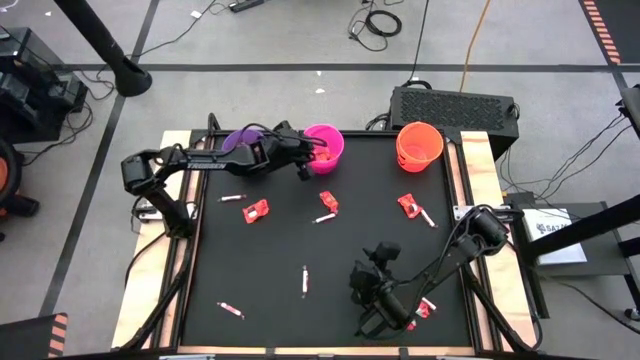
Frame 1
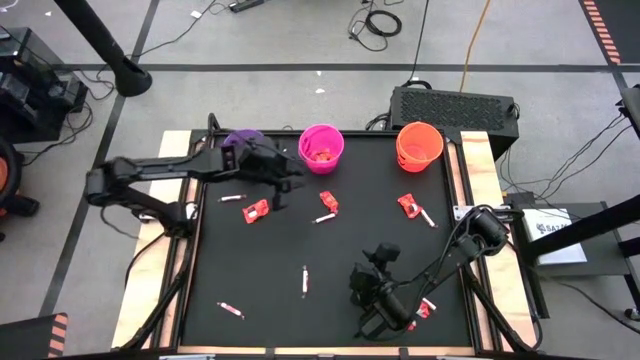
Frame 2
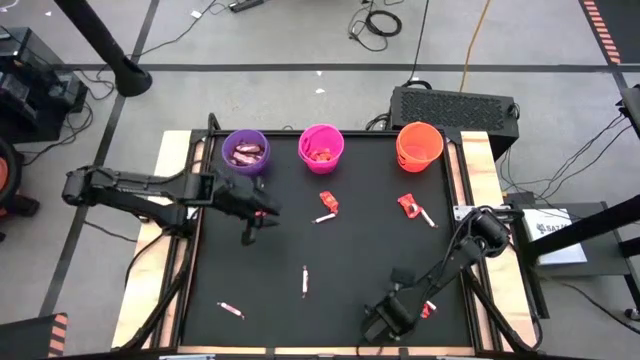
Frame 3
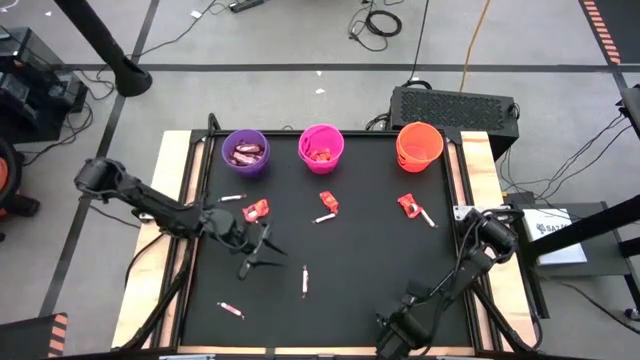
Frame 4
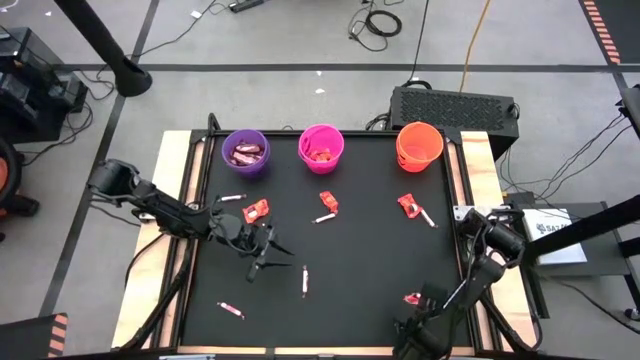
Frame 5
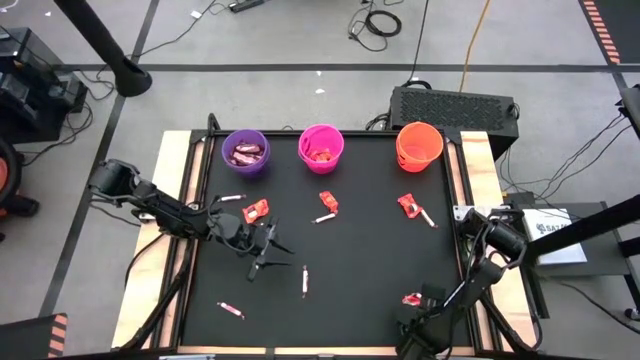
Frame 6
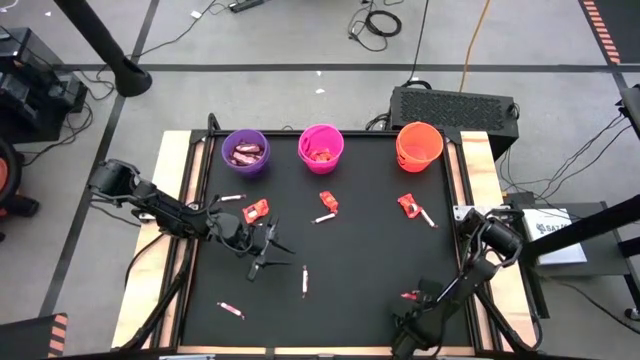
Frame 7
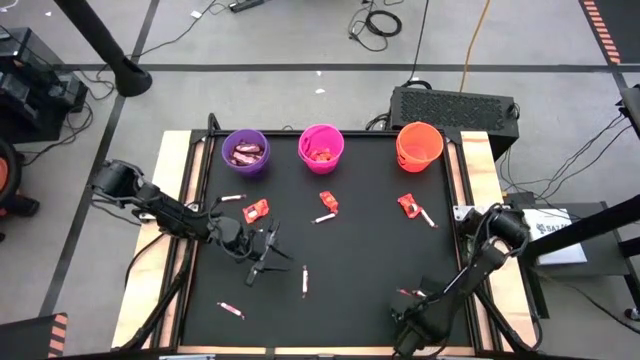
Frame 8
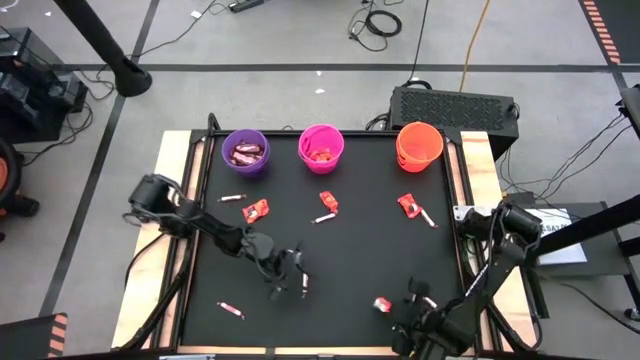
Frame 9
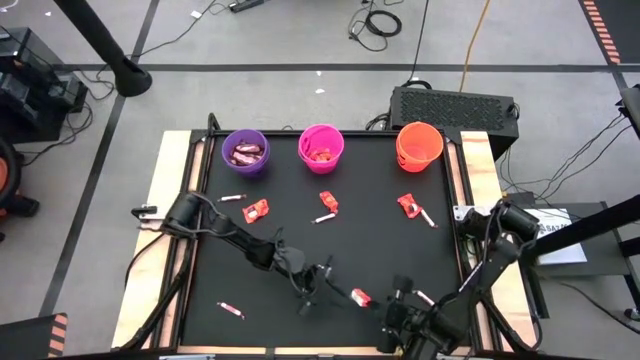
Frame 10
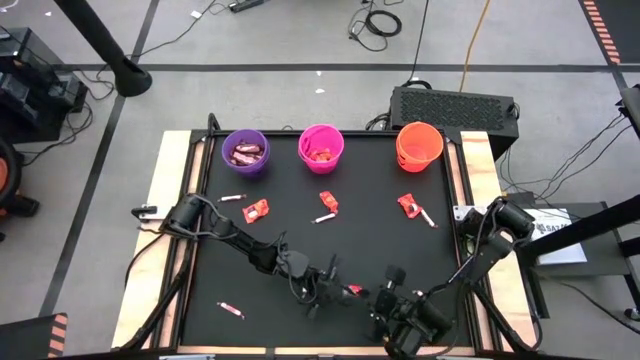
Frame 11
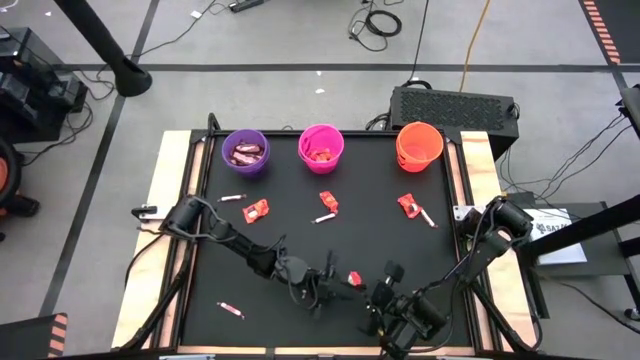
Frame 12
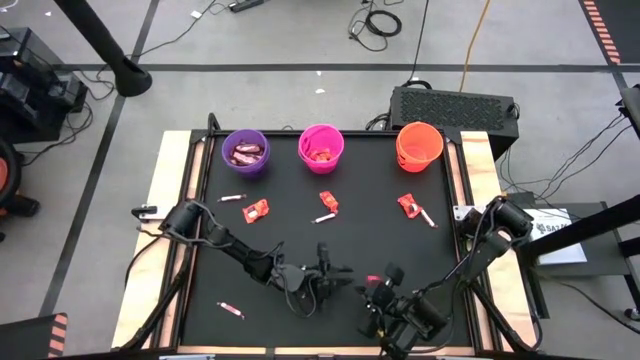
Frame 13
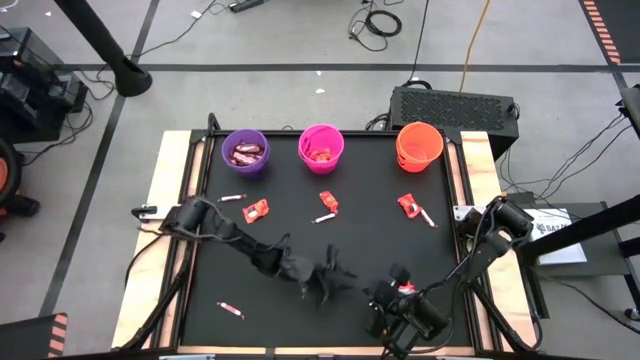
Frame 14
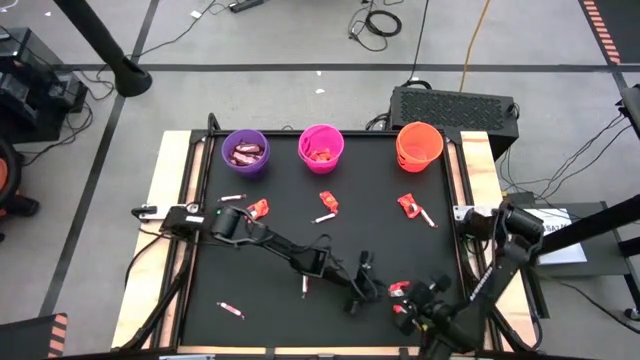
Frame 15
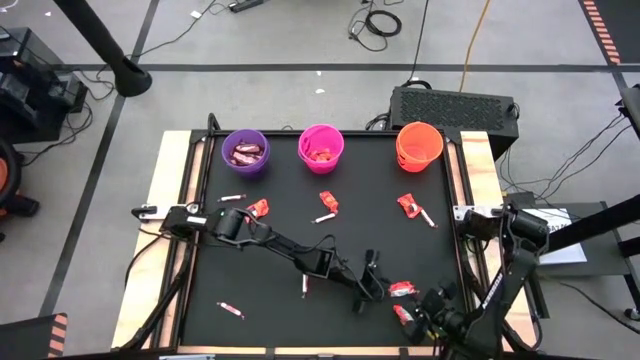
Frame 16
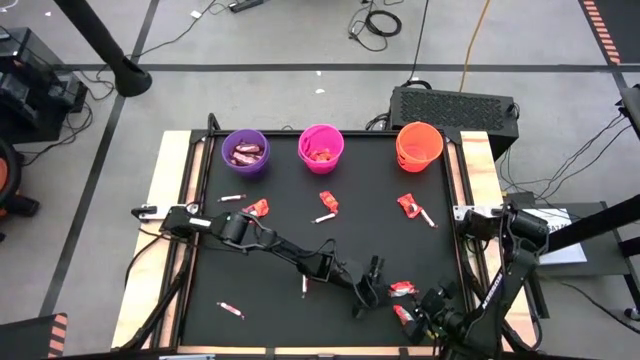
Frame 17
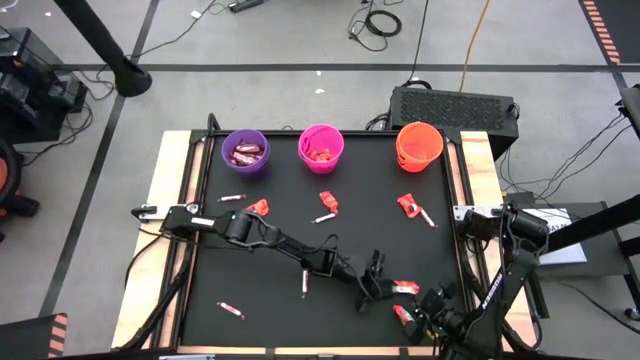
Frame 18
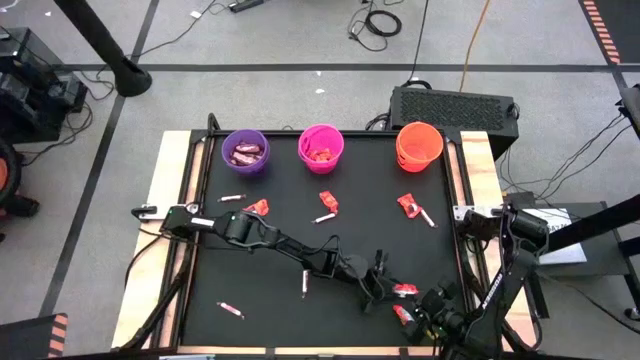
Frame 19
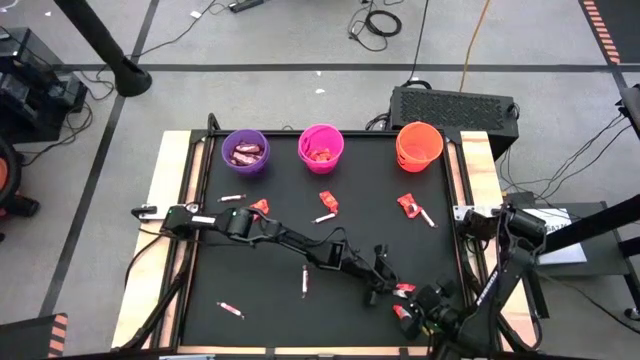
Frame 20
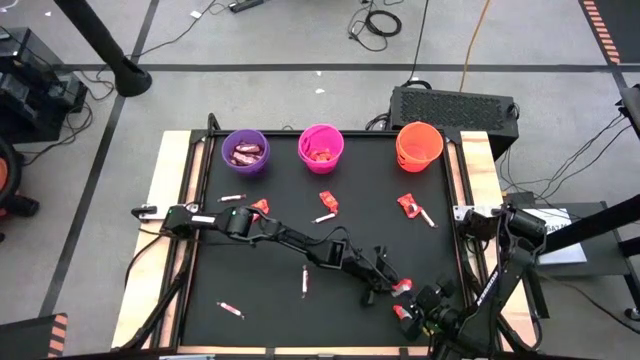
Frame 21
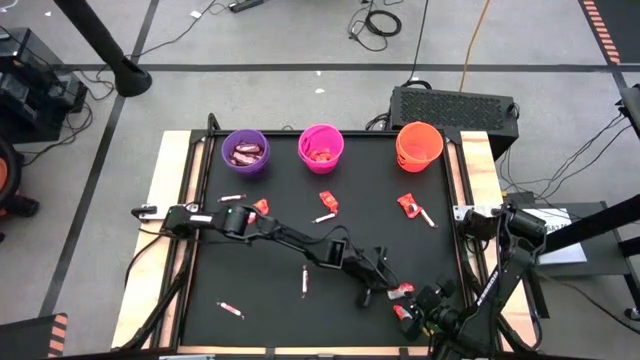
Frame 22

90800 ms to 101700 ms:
Task: Sort candy by brand, put in halloween buckets
Put the red chocolate bar into the pink bucket

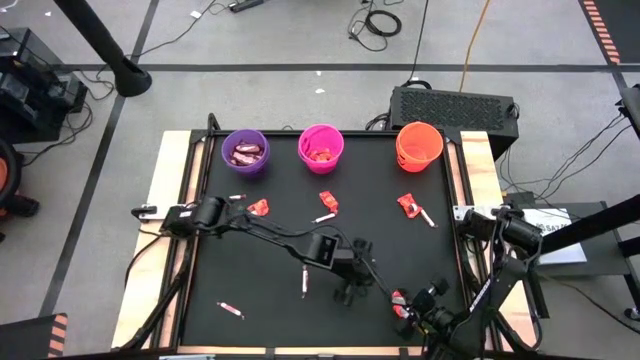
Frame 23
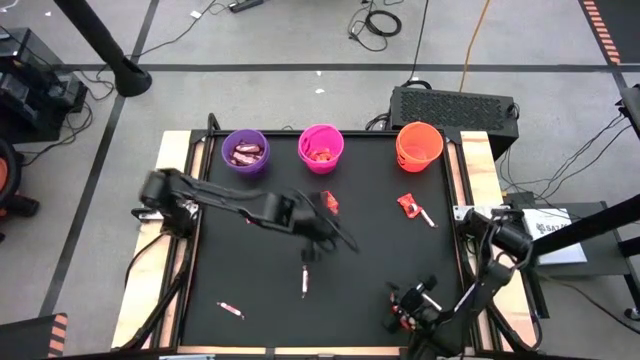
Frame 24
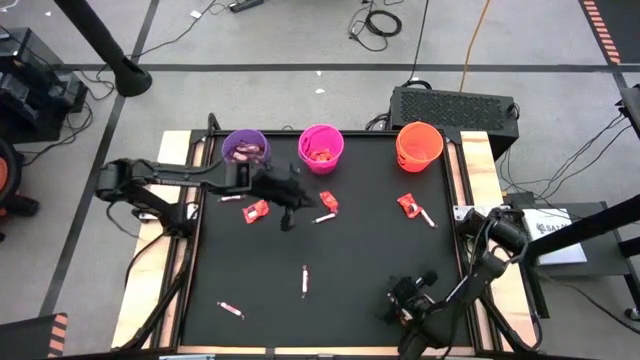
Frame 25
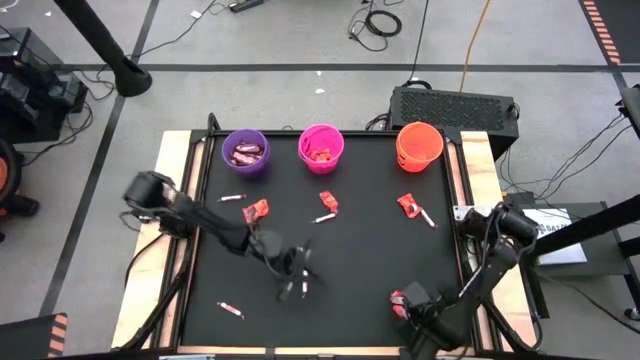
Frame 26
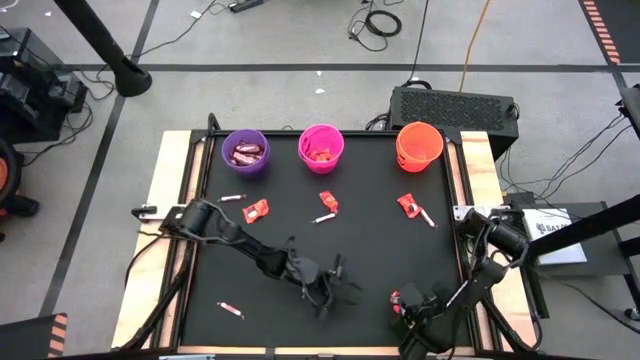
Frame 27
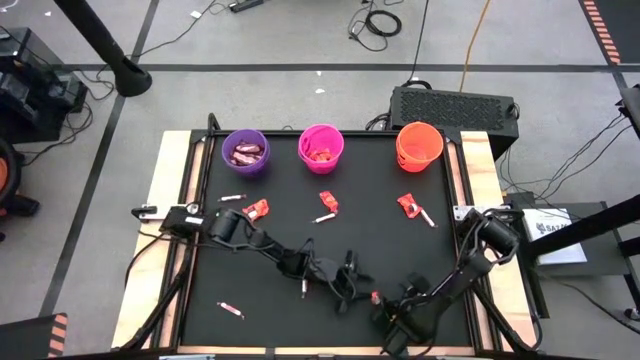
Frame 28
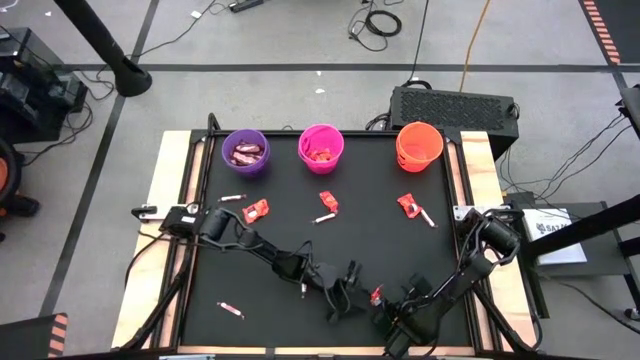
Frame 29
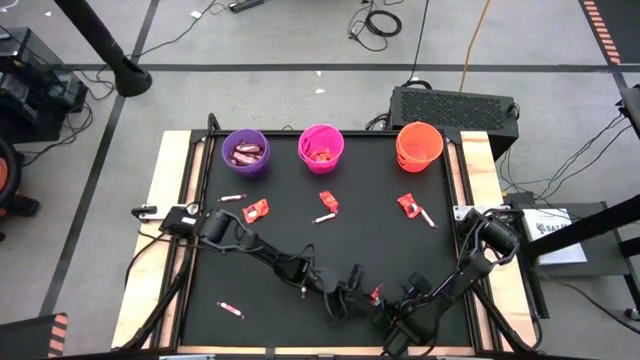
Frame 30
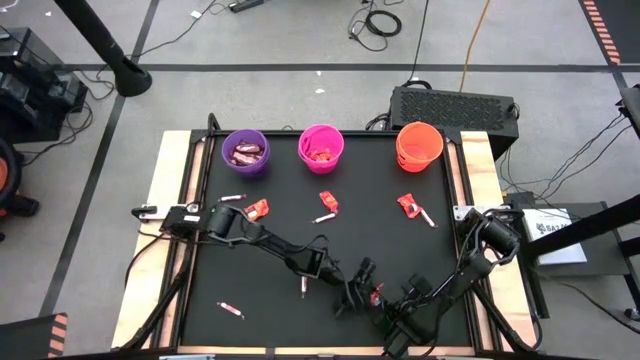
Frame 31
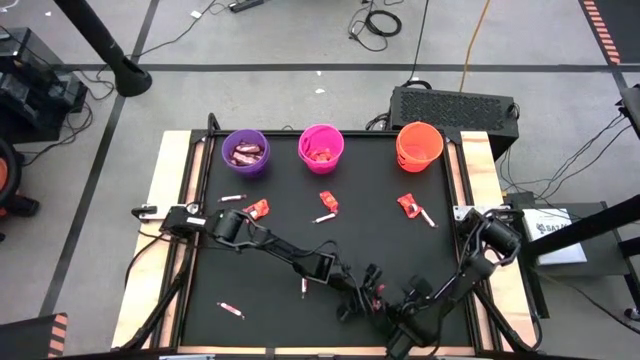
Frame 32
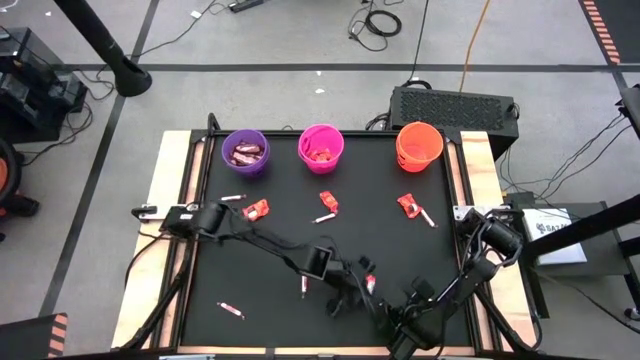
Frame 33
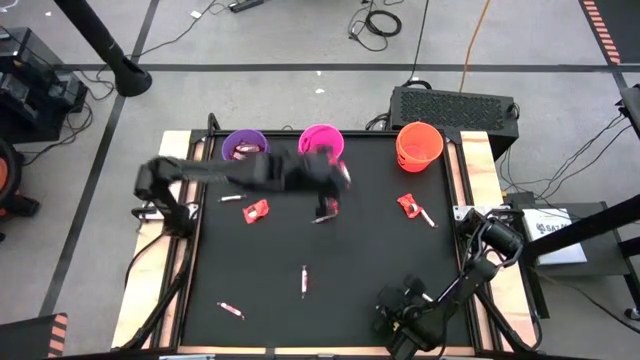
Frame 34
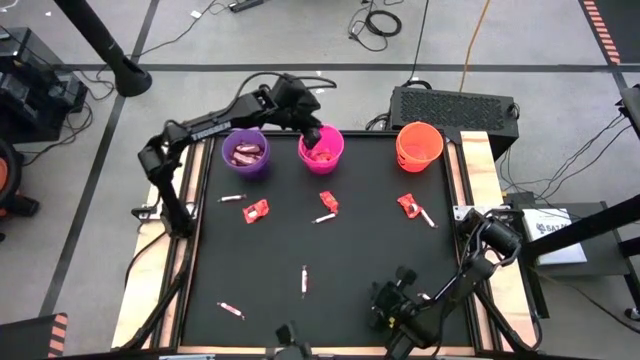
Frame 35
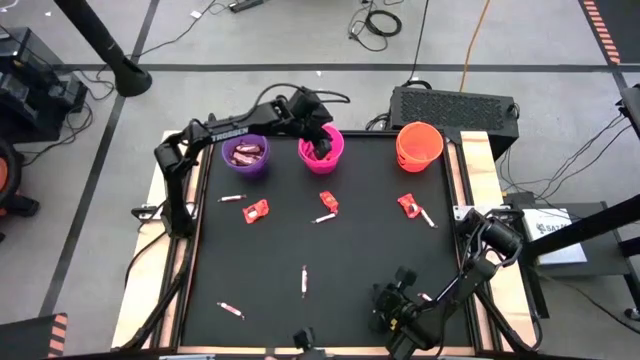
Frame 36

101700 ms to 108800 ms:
Put the red chocolate bar into the pink bucket

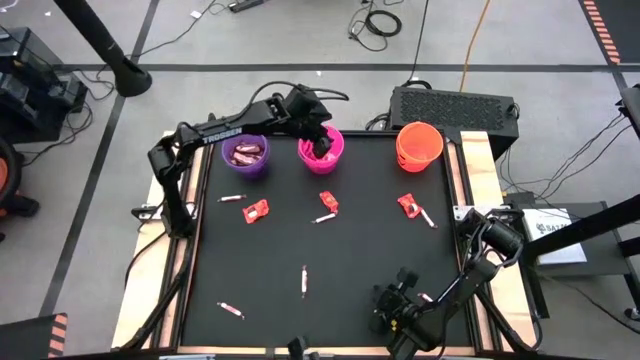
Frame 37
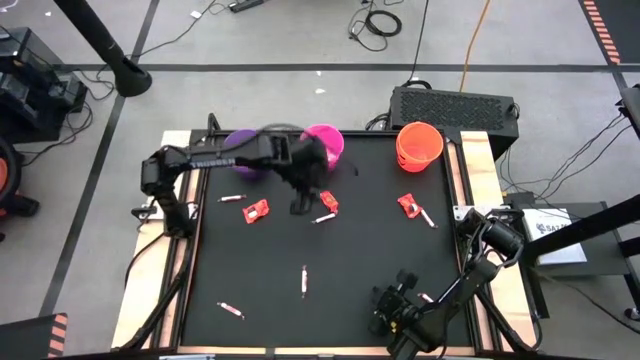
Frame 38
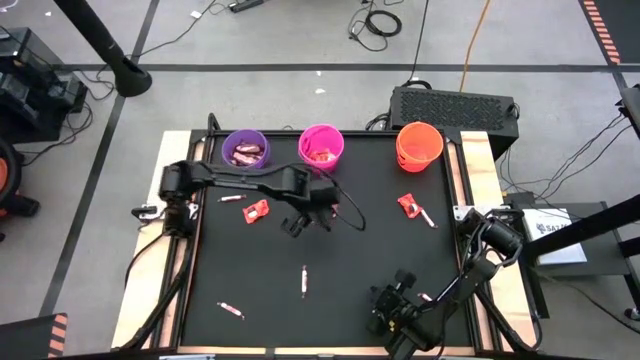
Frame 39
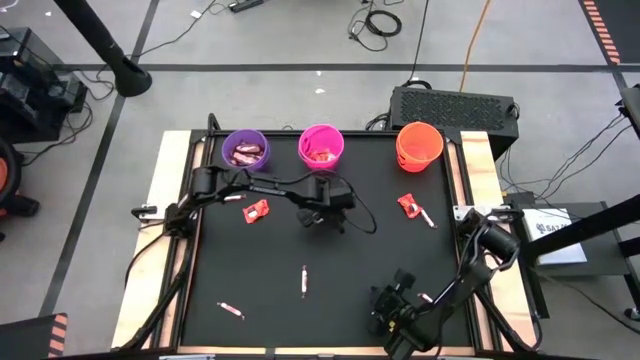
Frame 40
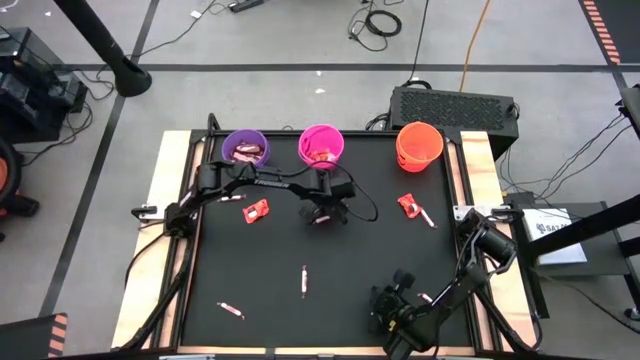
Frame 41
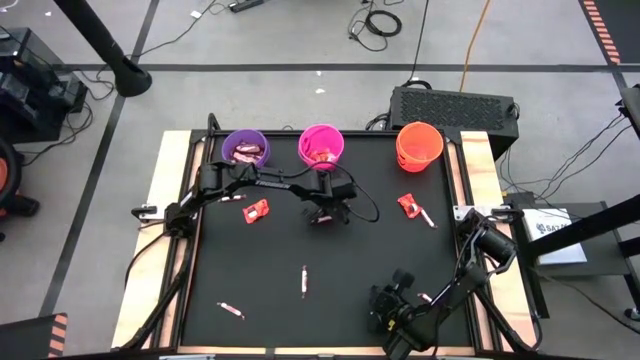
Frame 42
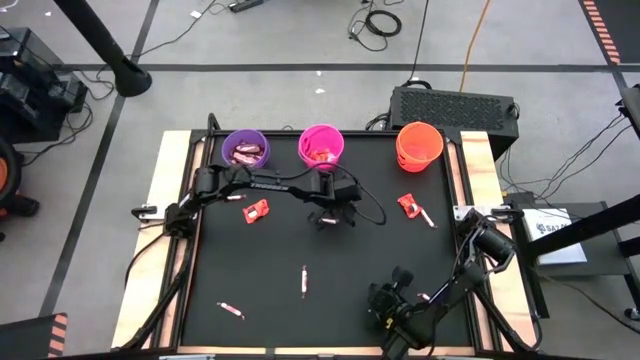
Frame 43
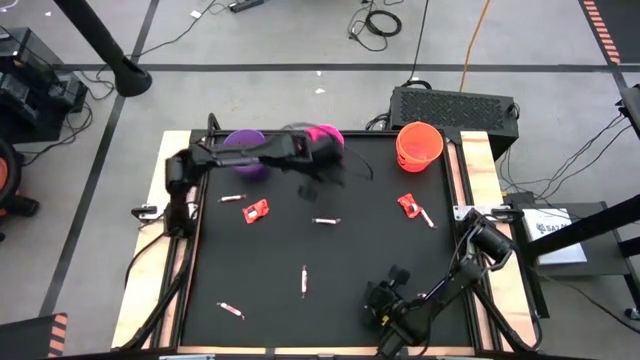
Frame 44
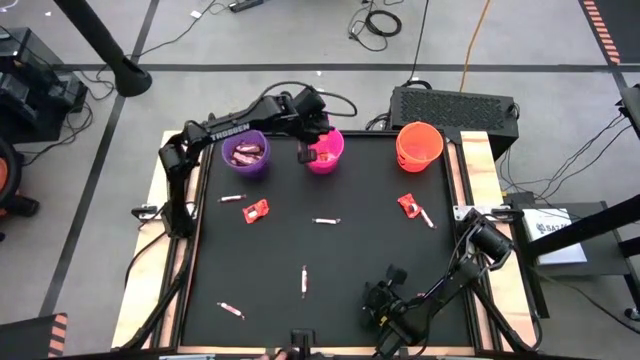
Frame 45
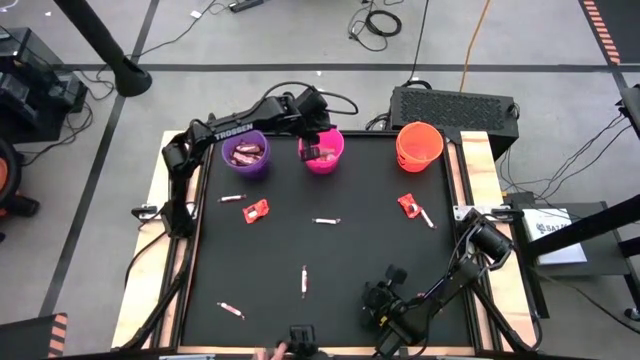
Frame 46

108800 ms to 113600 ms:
Put the red chocolate bar into the pink bucket
